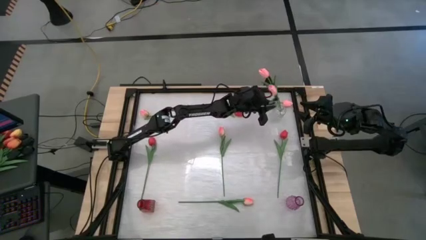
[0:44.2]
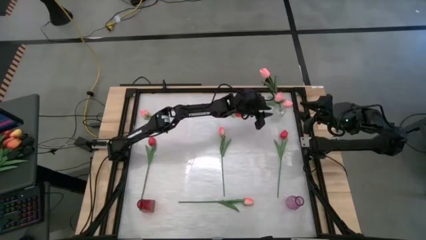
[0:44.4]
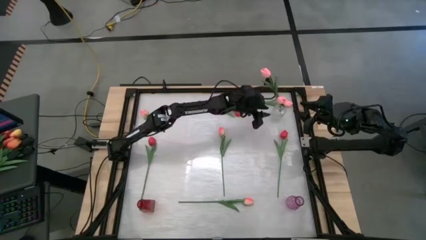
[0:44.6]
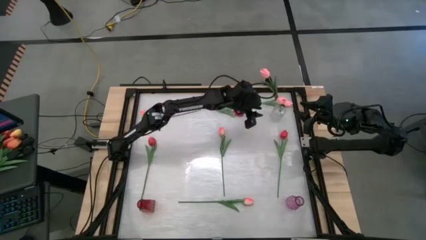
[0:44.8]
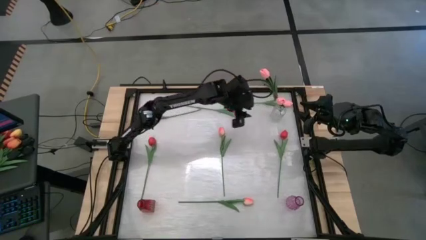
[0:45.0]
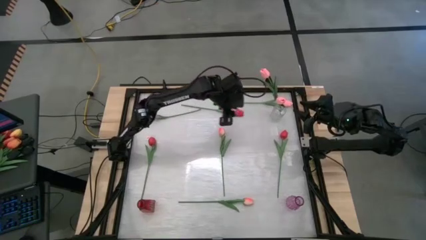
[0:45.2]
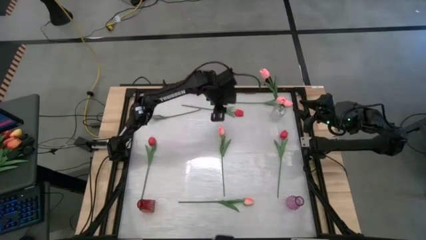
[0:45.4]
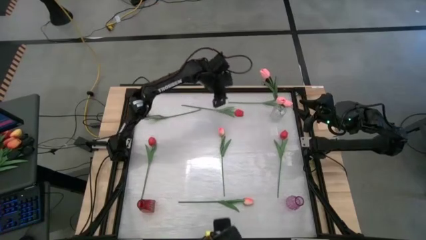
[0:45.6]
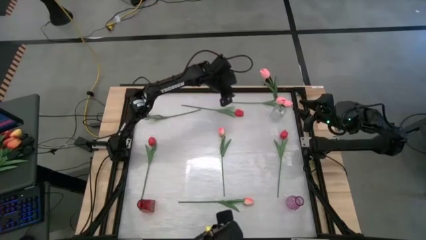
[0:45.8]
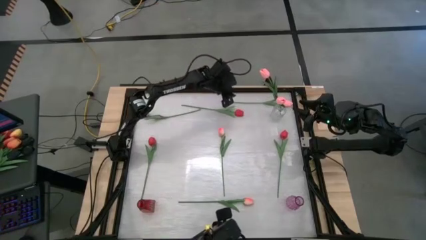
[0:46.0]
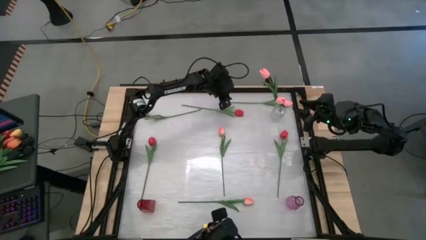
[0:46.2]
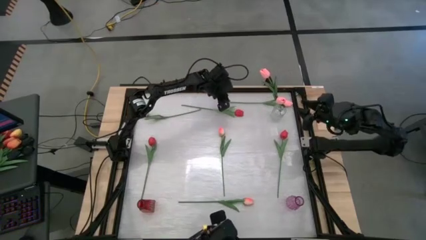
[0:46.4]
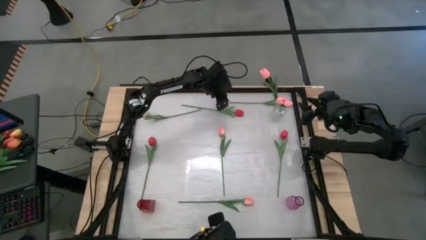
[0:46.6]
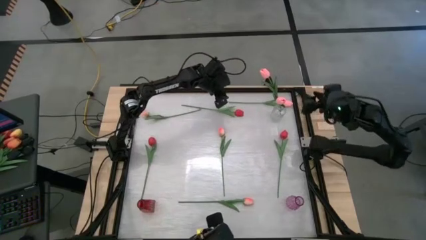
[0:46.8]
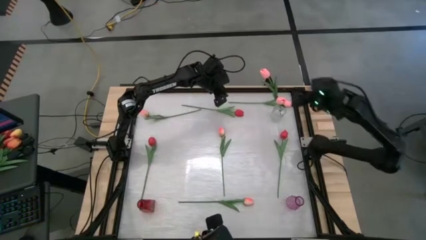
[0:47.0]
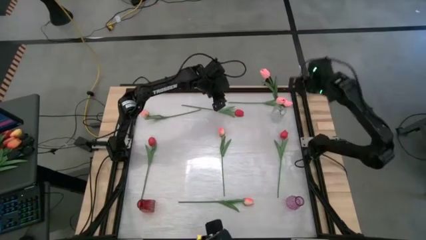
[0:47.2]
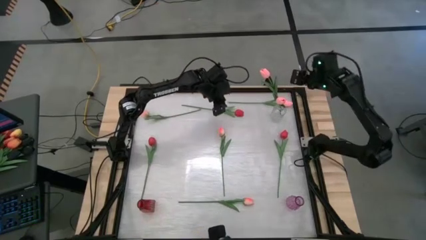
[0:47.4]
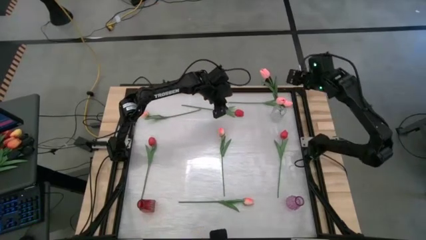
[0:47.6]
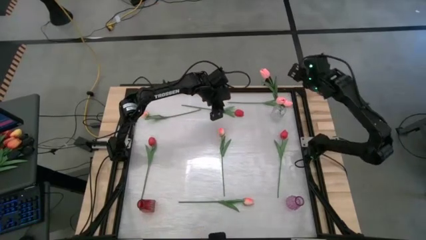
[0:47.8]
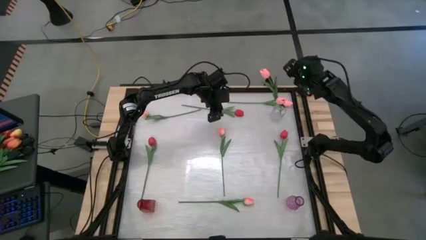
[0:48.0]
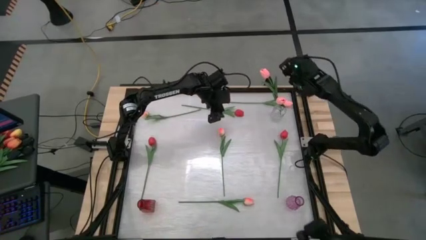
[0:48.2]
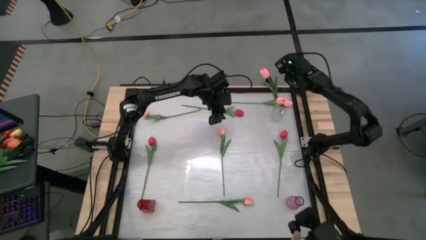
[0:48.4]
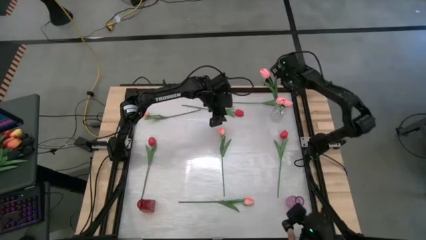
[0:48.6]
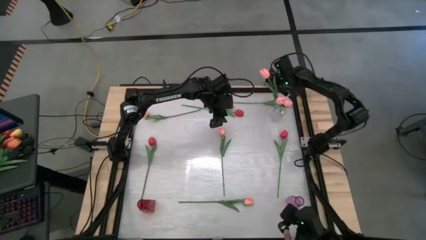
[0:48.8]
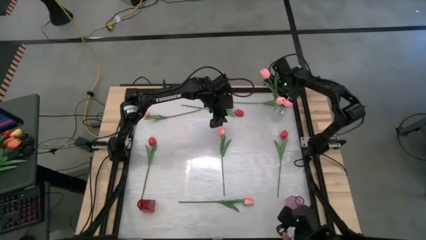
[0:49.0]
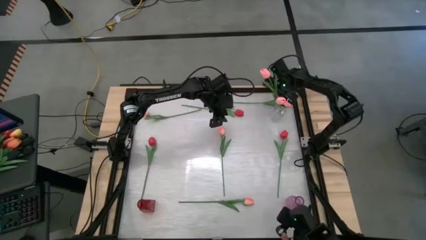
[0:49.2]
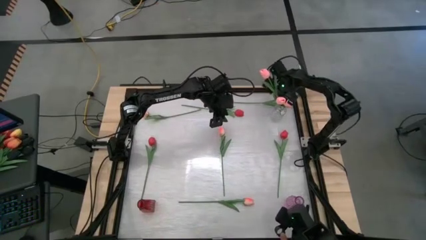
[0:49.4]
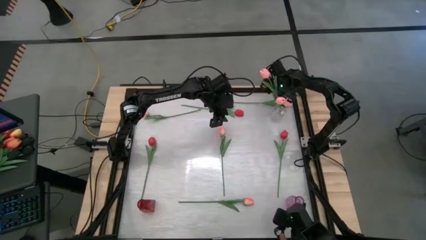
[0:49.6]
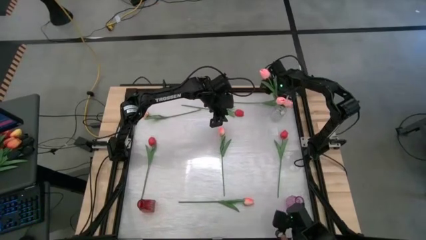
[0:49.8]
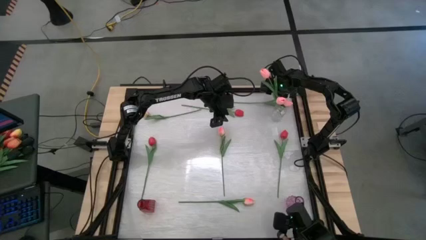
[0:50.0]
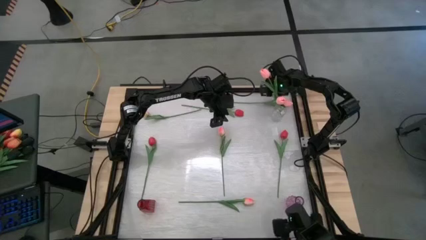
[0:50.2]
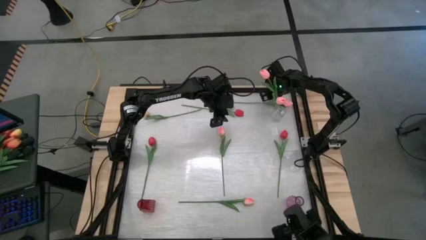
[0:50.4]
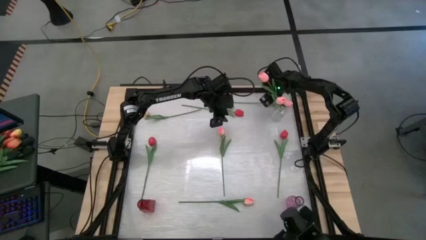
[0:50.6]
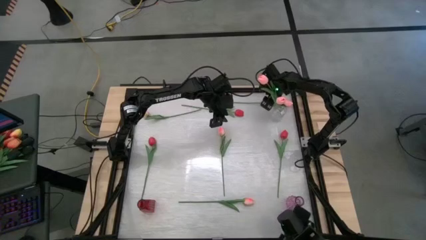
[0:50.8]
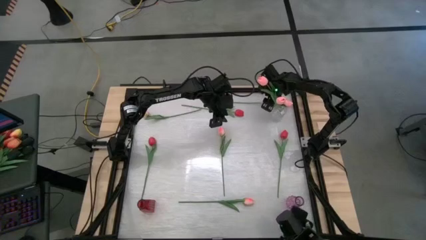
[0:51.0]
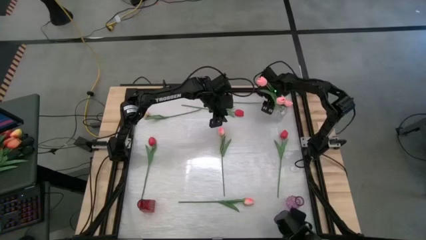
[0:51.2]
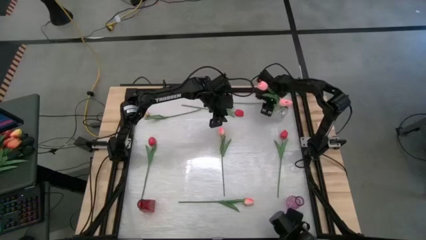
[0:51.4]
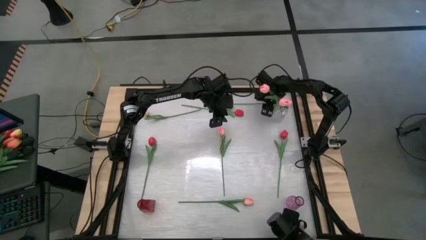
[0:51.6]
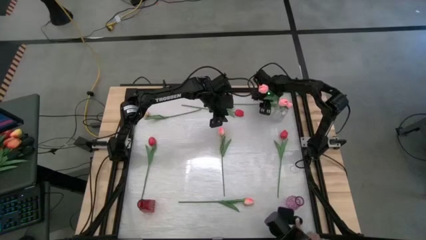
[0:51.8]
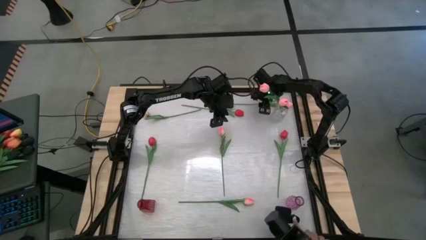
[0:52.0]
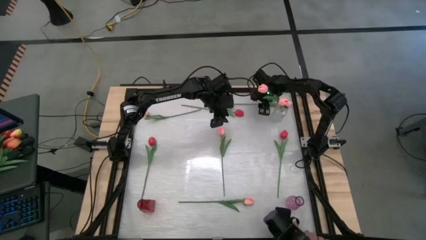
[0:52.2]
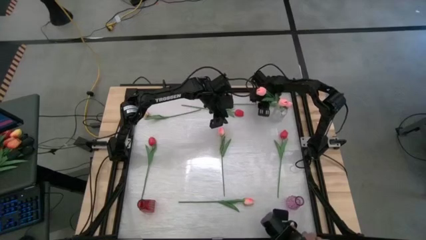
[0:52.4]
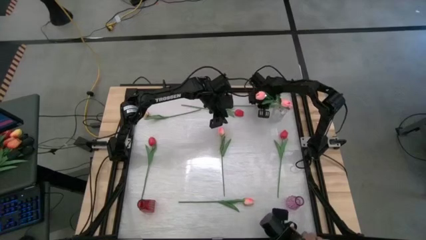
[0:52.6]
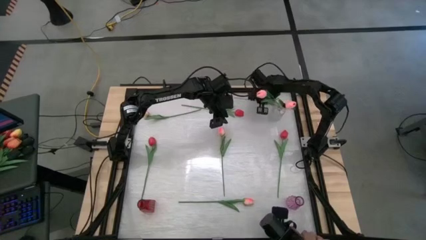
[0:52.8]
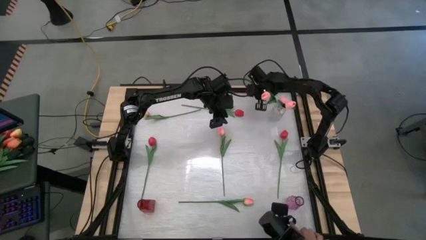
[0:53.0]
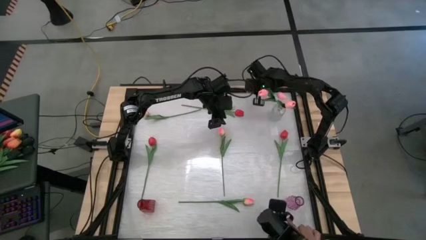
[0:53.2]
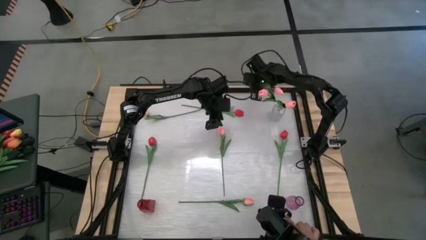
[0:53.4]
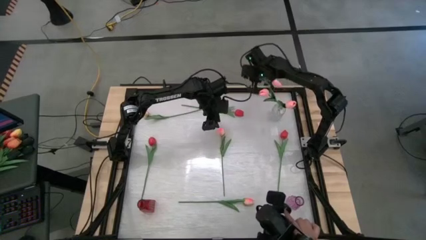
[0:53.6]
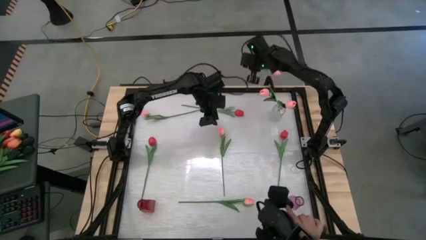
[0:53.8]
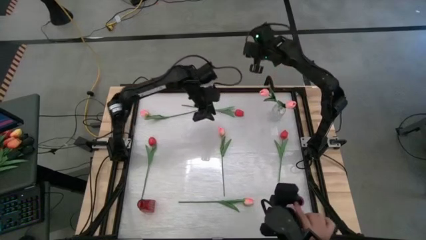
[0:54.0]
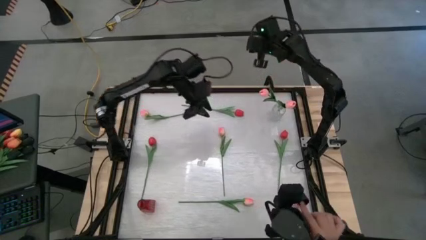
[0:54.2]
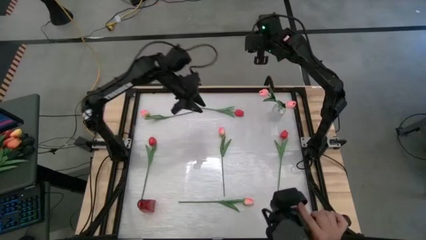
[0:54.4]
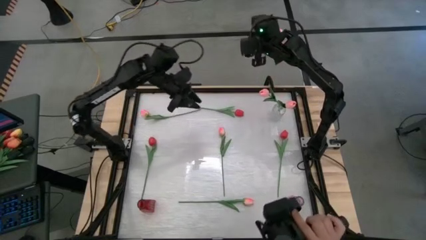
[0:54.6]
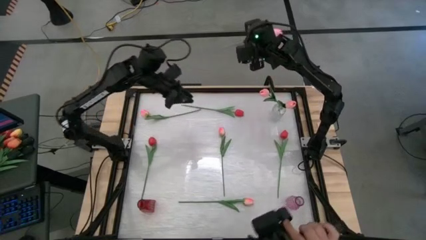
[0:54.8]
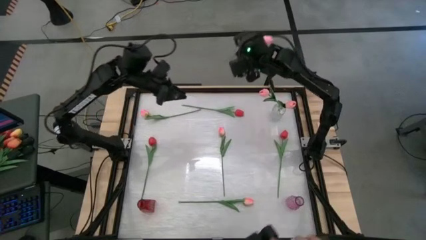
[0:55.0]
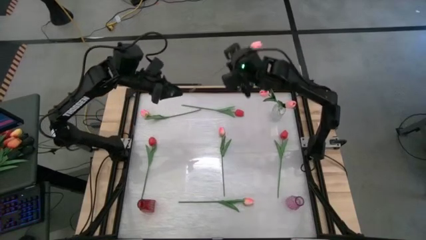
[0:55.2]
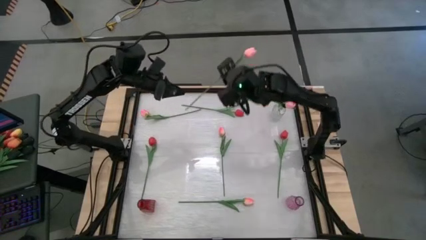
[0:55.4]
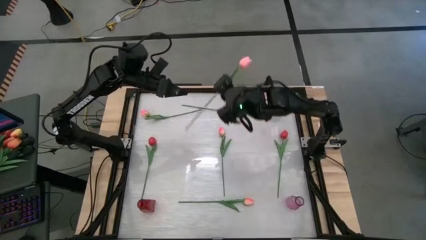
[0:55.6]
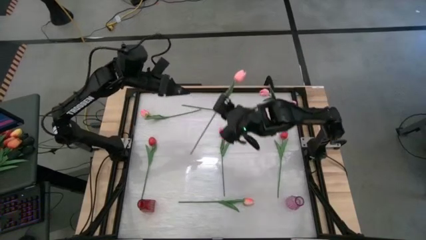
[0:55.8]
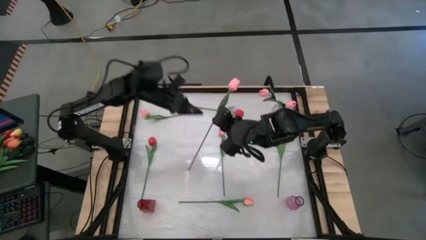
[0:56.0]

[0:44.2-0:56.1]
Task: Sort flowers into vase by color
Put the pink flower in the transparent vase
